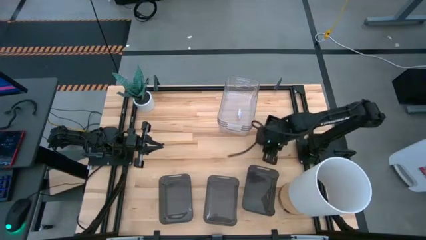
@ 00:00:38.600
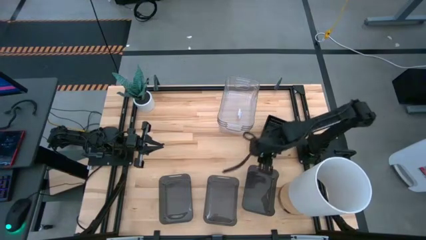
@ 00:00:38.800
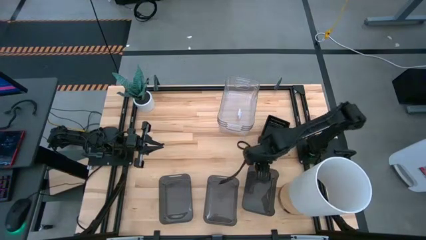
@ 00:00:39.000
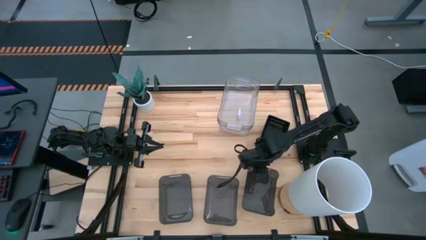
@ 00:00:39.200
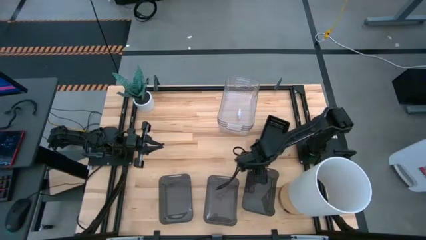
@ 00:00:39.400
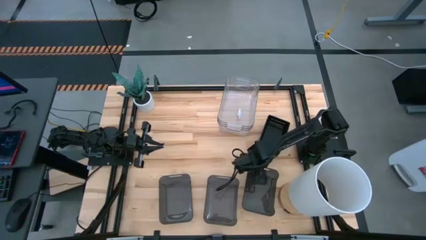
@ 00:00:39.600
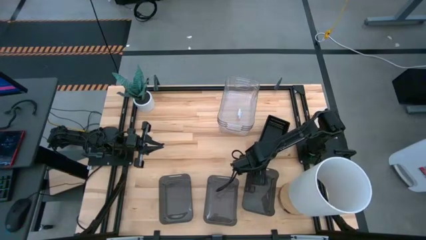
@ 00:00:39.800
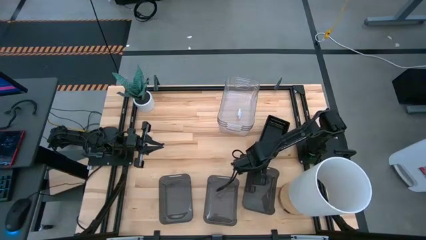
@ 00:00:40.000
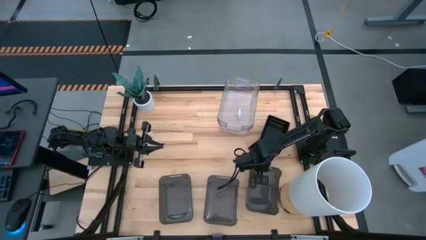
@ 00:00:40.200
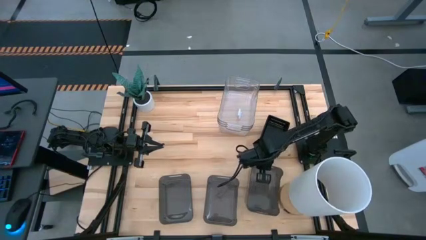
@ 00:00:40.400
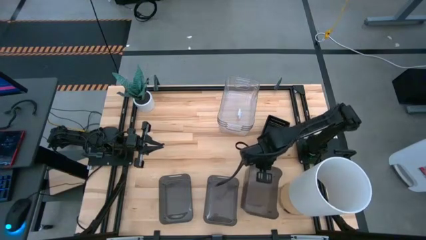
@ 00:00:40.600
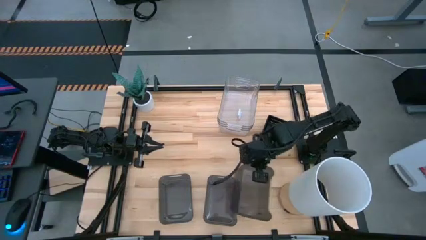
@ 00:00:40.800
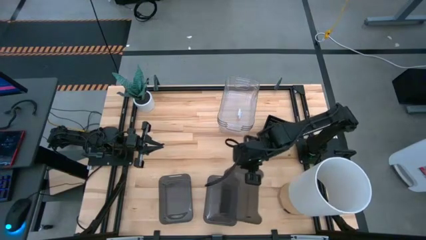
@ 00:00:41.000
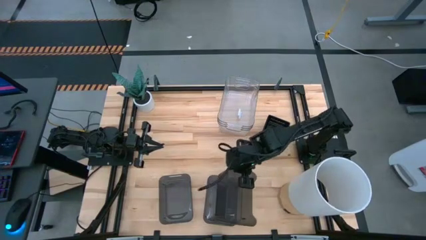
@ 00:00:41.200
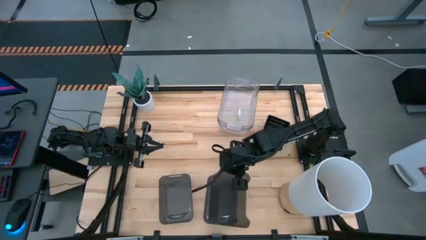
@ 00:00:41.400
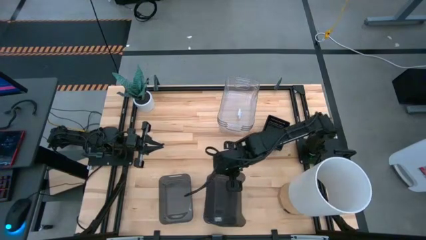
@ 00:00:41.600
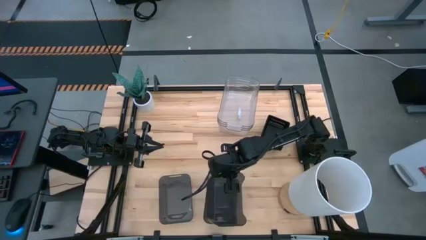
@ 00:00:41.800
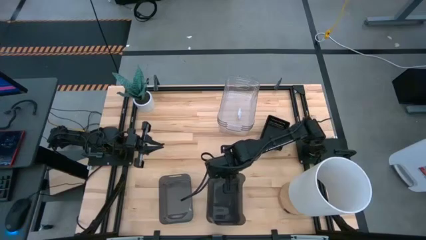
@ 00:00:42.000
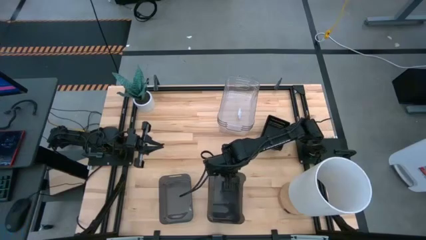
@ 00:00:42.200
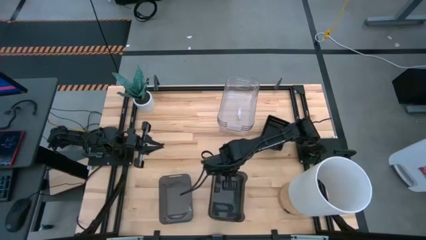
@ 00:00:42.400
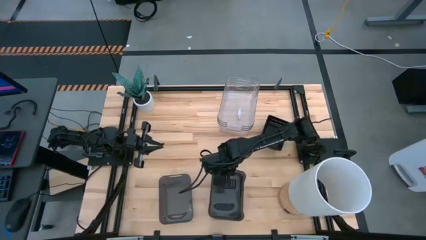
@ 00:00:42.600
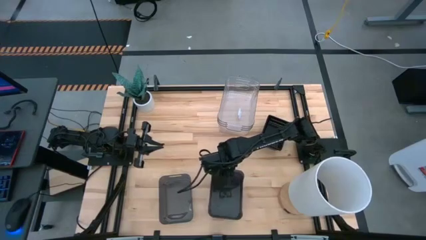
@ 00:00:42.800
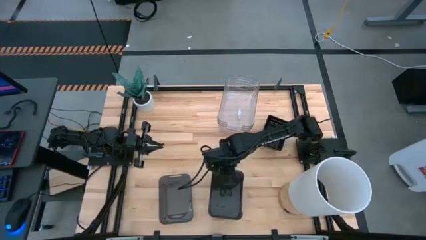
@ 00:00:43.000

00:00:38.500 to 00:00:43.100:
Stack the right gray bin on top of the middle gray bin

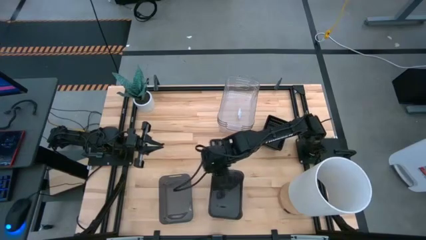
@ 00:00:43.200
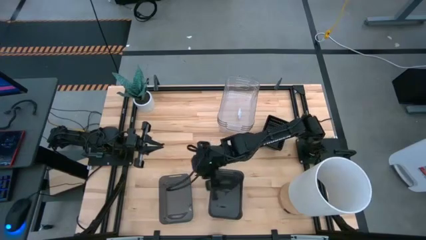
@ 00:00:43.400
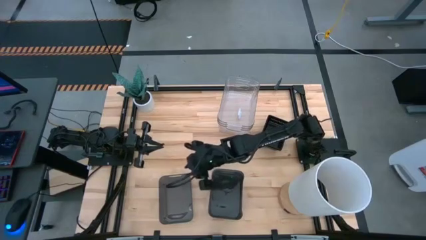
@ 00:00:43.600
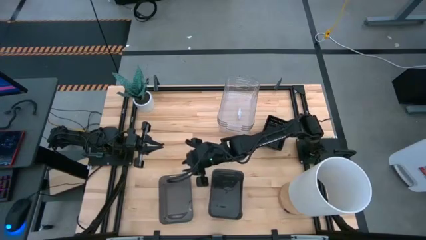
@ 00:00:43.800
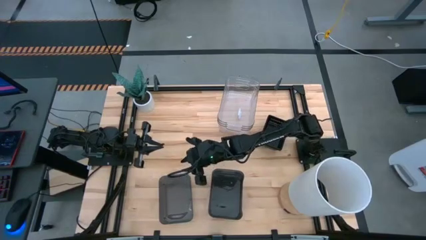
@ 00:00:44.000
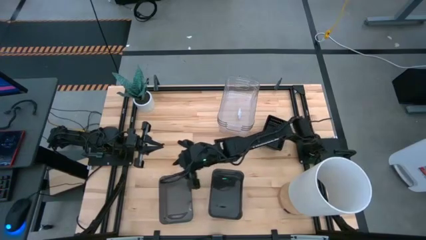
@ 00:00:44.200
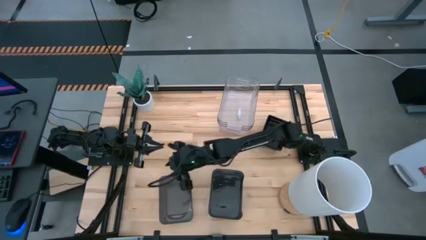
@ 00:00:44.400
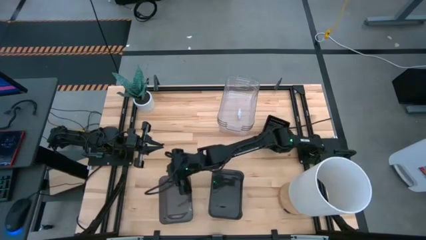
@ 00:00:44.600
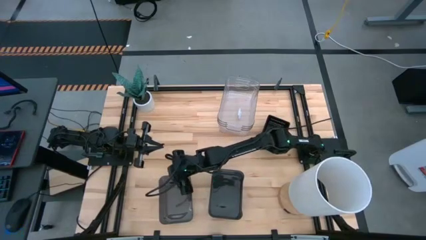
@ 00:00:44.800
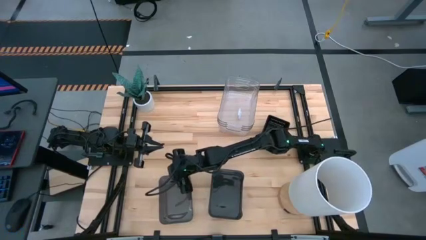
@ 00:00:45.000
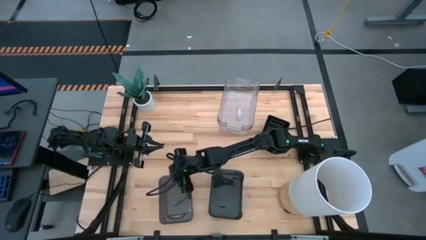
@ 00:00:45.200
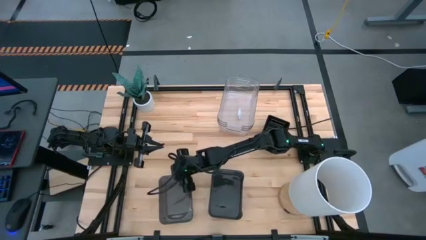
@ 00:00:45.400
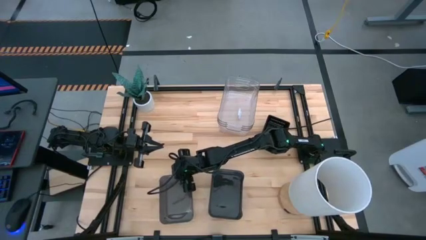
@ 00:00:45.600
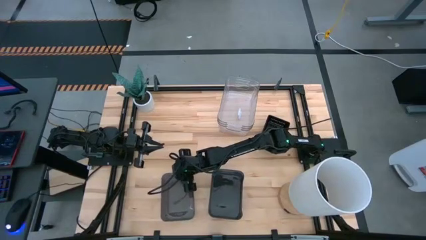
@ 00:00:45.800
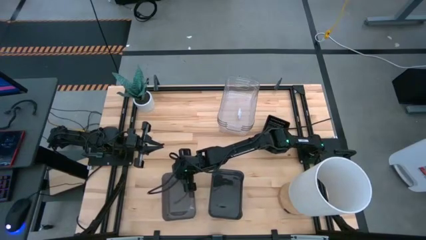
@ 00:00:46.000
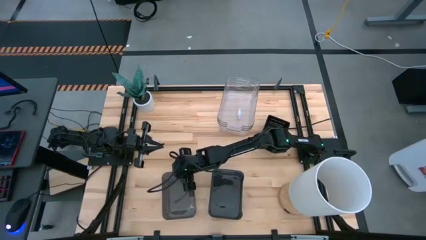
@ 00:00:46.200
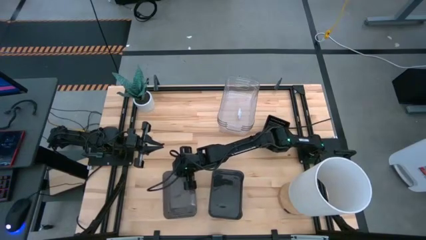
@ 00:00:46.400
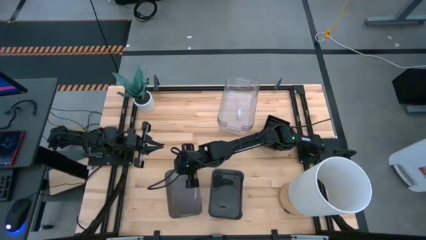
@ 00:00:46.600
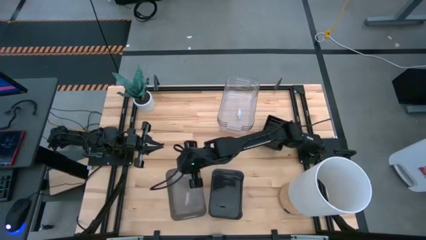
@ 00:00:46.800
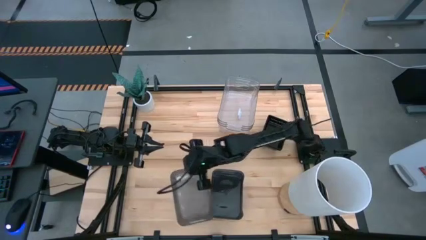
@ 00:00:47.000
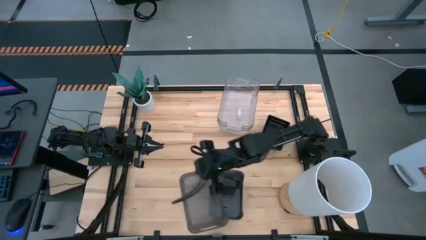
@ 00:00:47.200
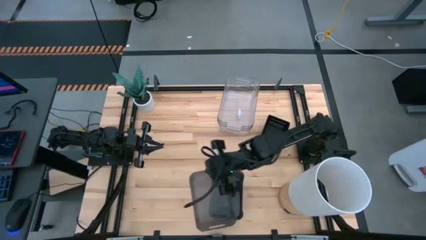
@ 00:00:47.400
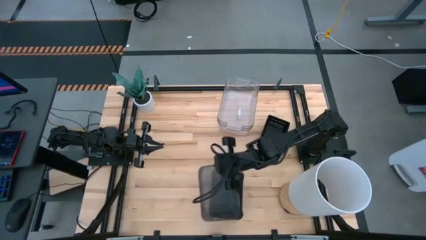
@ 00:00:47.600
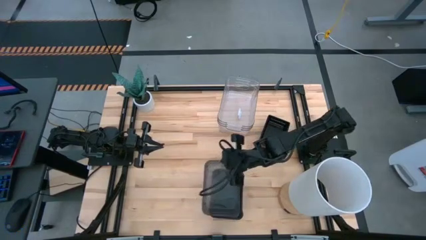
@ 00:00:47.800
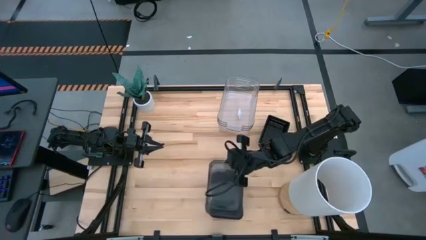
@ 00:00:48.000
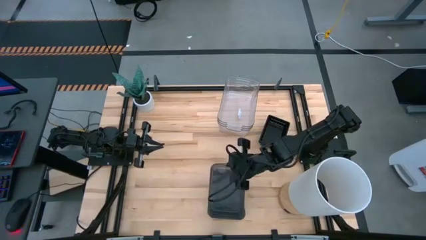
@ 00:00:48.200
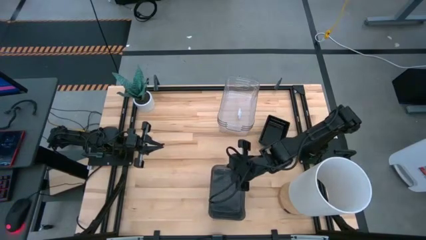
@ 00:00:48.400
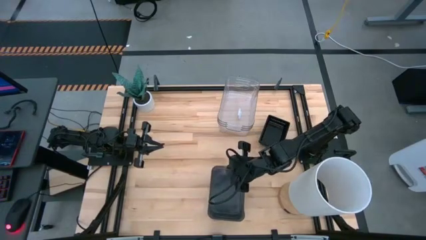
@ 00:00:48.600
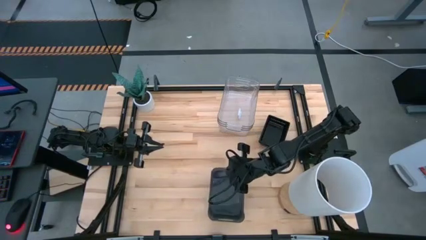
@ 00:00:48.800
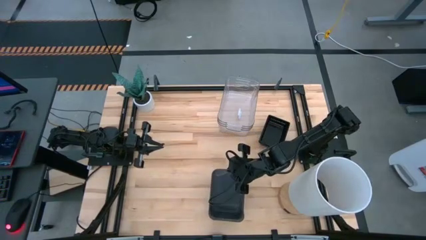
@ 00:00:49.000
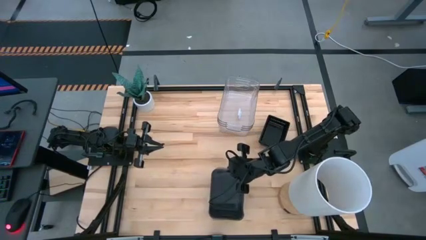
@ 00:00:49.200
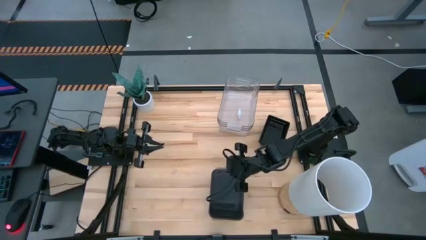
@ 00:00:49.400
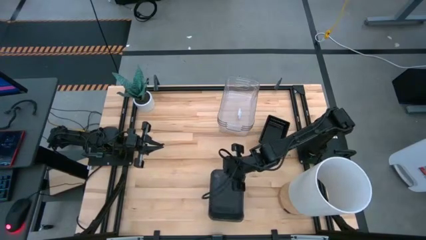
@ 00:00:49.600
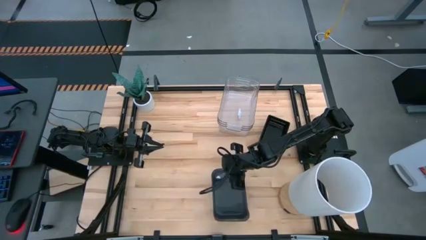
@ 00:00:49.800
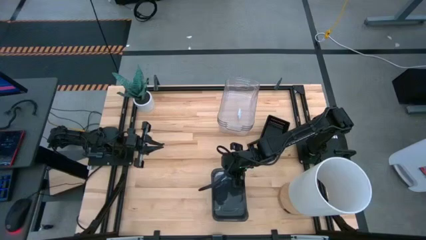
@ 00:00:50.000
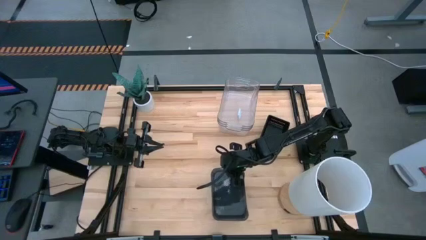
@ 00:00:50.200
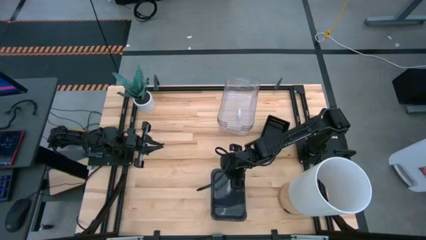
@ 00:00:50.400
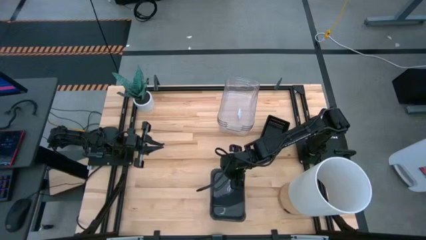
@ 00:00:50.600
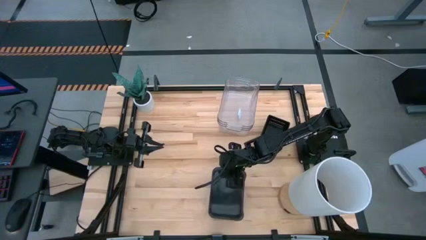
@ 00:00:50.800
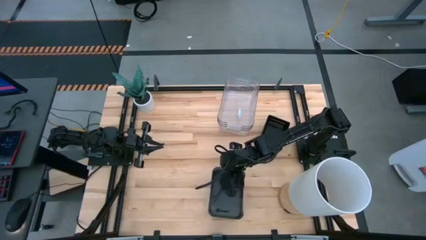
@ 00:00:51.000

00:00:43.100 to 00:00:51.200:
Stack the left gray bin on top of the right gray bin
